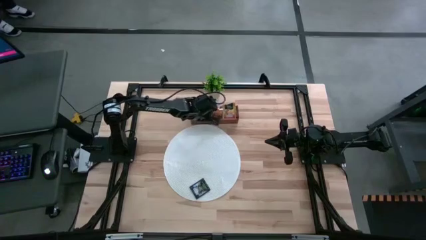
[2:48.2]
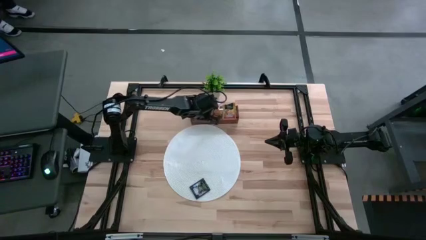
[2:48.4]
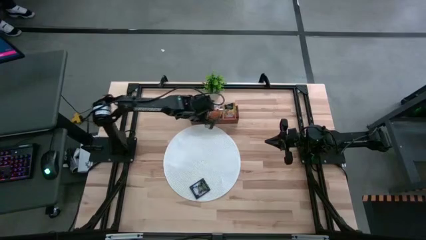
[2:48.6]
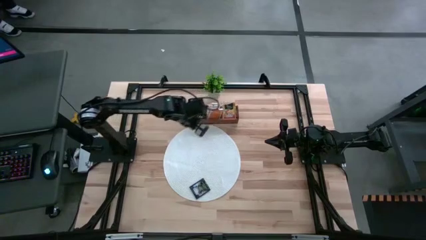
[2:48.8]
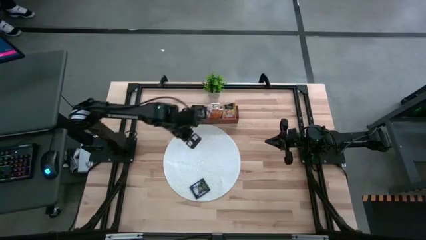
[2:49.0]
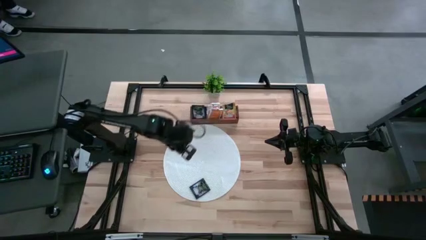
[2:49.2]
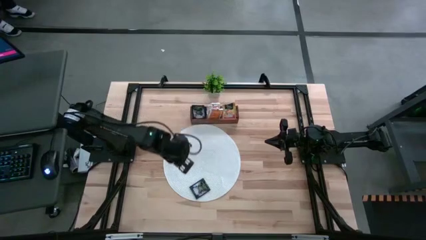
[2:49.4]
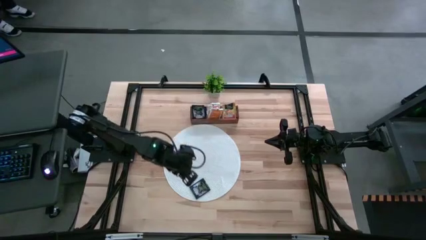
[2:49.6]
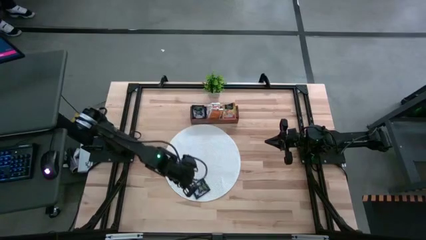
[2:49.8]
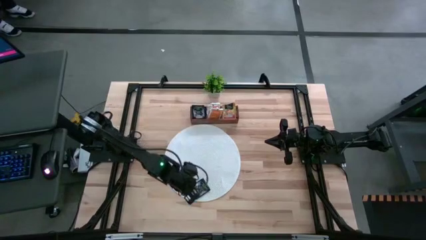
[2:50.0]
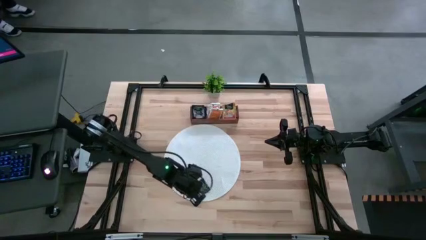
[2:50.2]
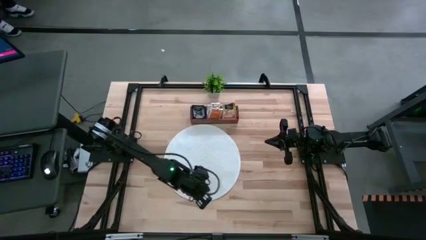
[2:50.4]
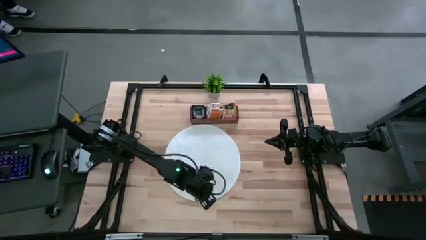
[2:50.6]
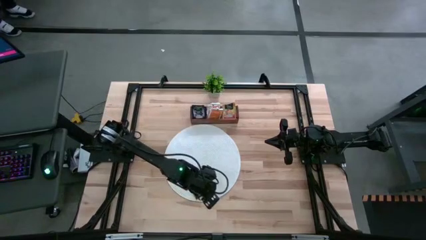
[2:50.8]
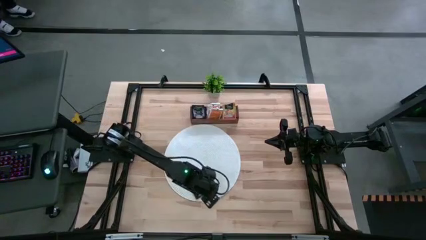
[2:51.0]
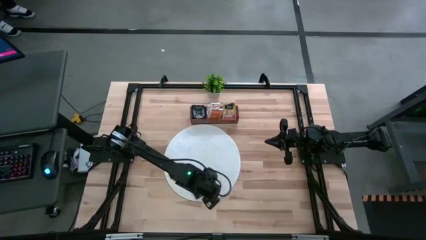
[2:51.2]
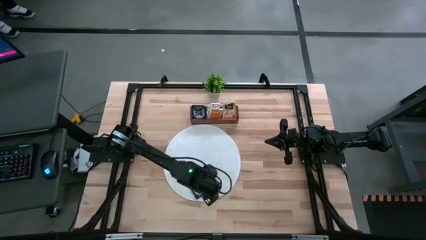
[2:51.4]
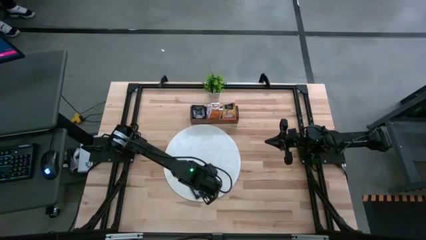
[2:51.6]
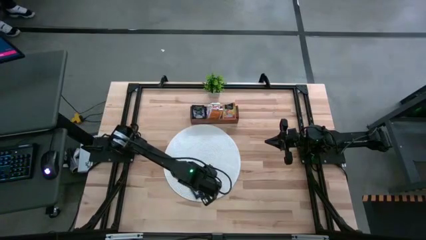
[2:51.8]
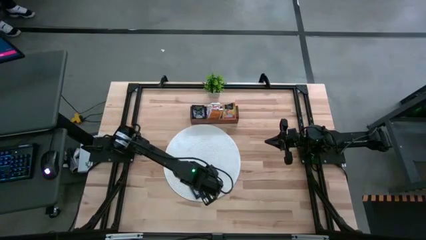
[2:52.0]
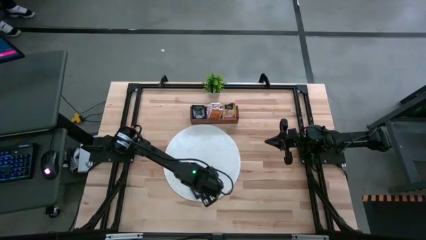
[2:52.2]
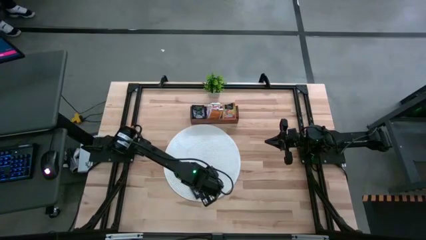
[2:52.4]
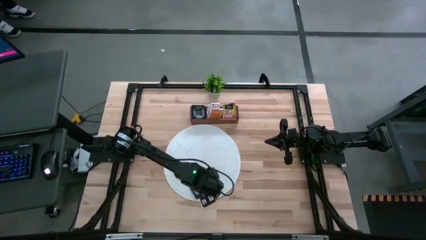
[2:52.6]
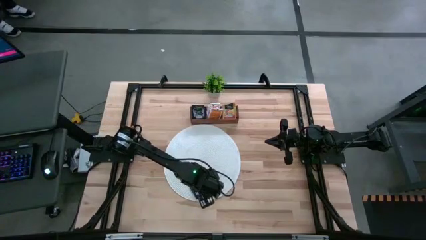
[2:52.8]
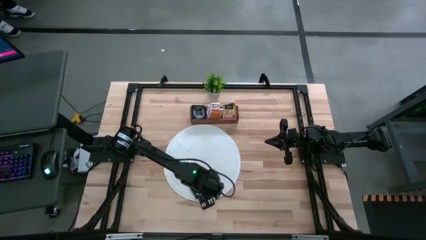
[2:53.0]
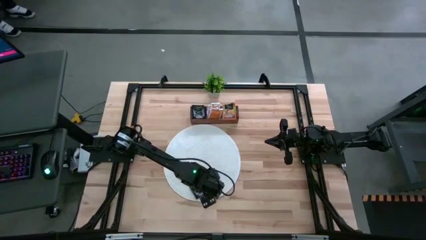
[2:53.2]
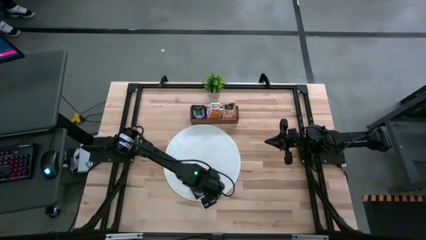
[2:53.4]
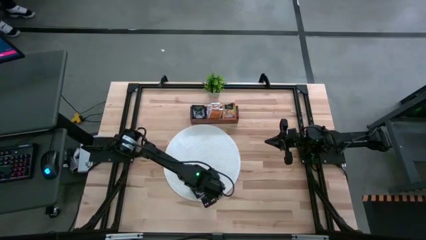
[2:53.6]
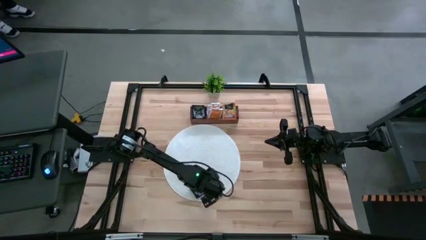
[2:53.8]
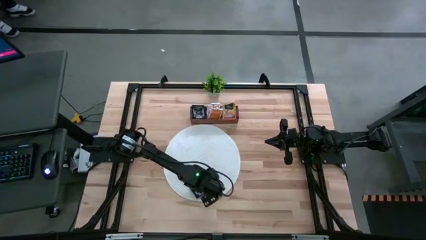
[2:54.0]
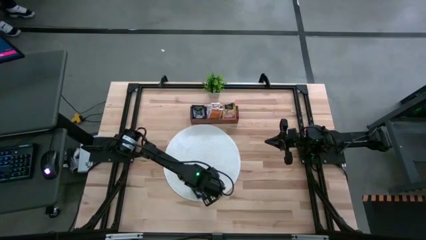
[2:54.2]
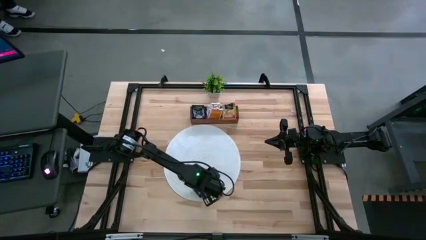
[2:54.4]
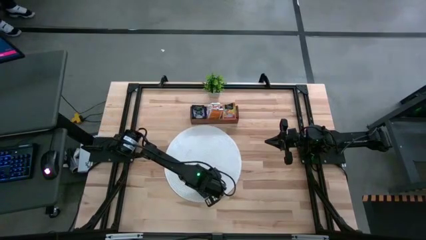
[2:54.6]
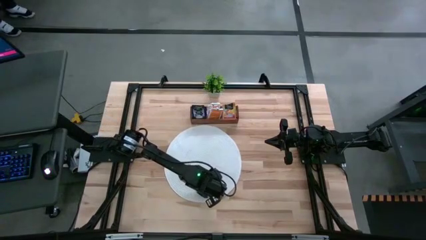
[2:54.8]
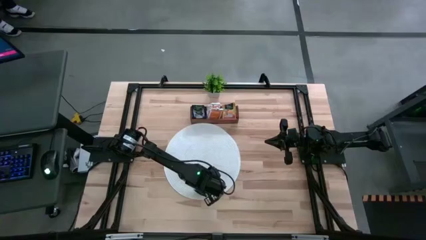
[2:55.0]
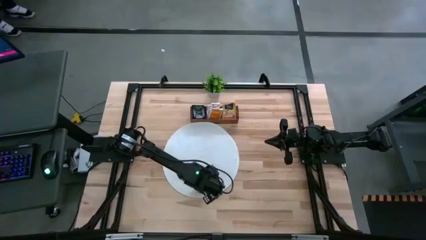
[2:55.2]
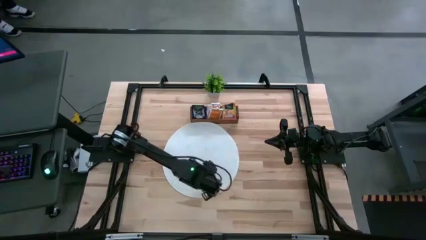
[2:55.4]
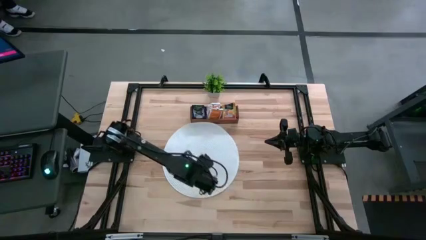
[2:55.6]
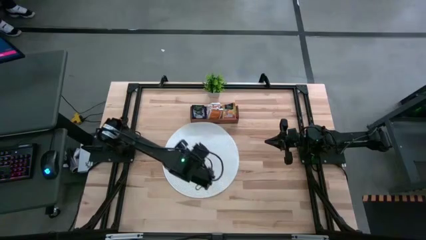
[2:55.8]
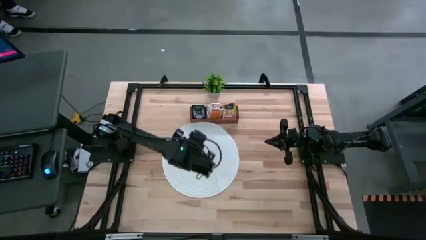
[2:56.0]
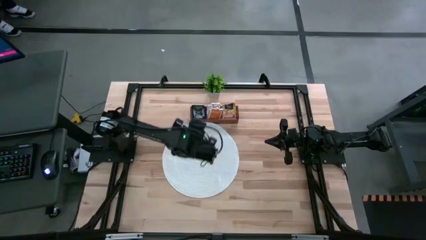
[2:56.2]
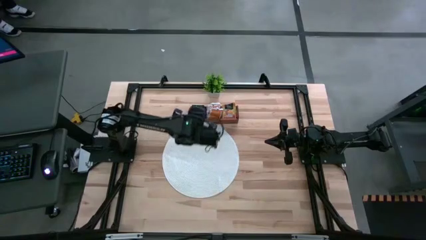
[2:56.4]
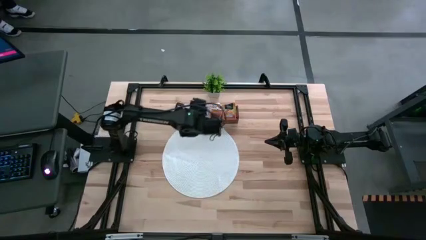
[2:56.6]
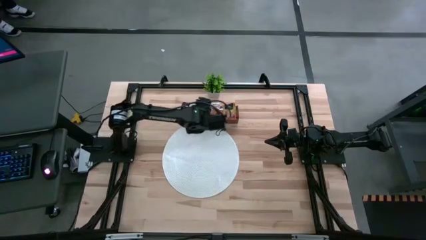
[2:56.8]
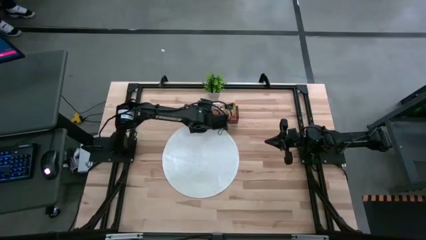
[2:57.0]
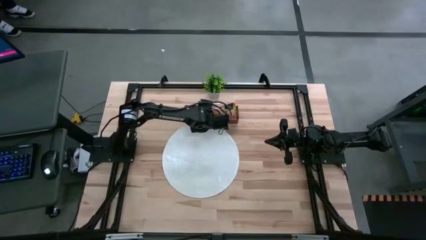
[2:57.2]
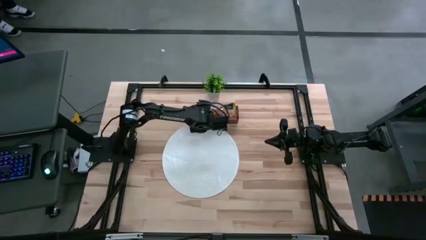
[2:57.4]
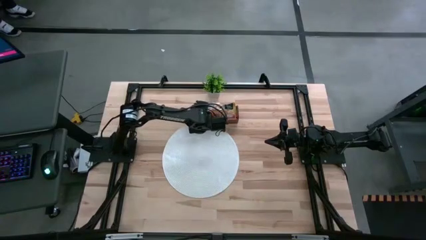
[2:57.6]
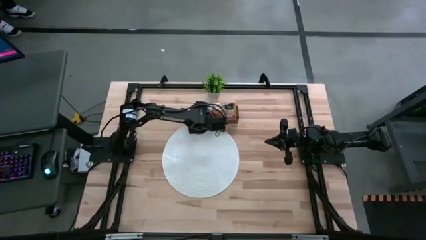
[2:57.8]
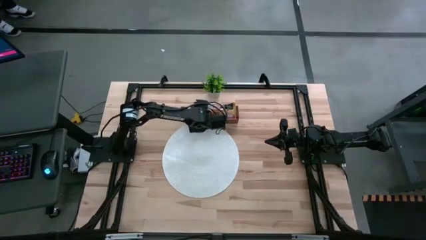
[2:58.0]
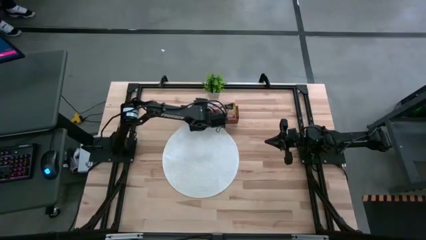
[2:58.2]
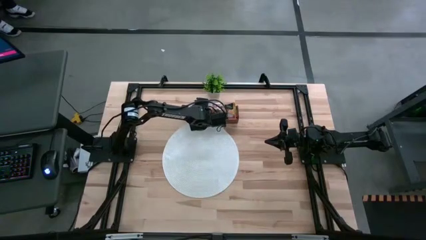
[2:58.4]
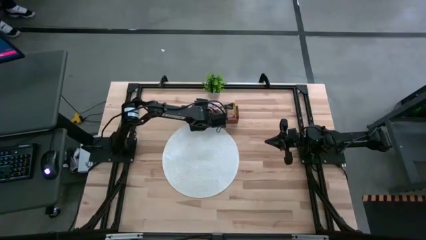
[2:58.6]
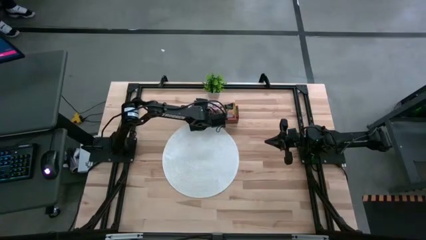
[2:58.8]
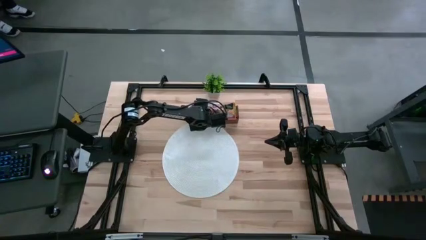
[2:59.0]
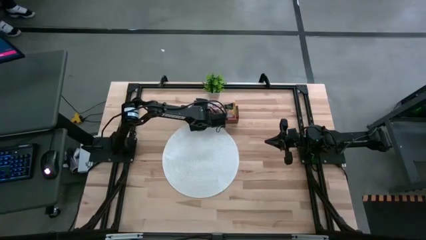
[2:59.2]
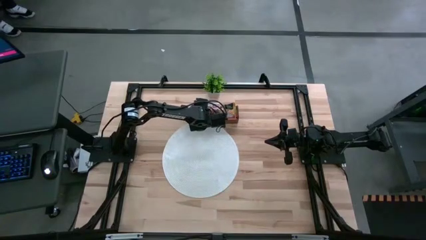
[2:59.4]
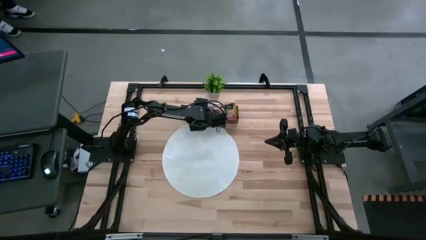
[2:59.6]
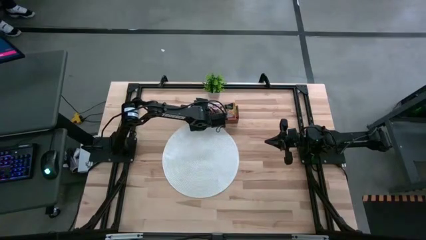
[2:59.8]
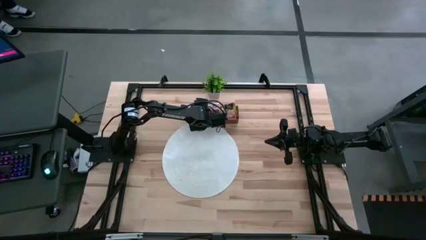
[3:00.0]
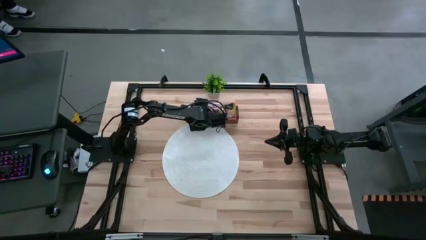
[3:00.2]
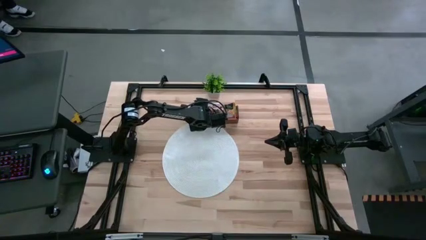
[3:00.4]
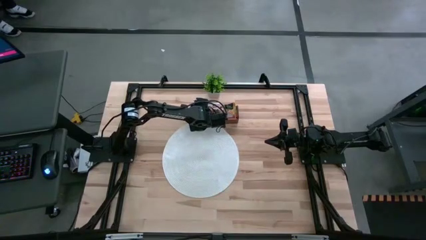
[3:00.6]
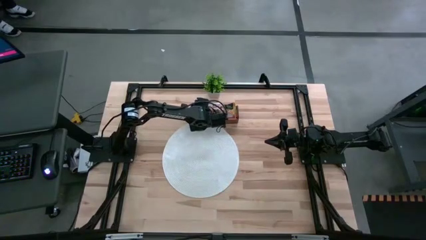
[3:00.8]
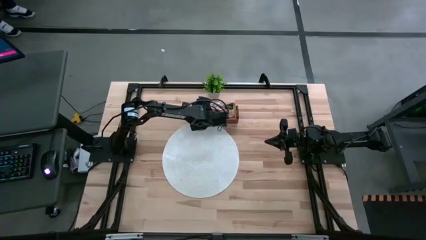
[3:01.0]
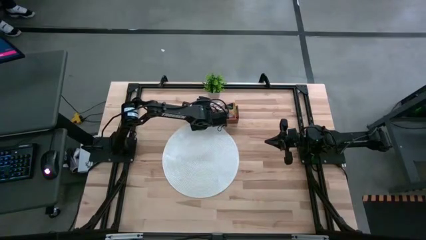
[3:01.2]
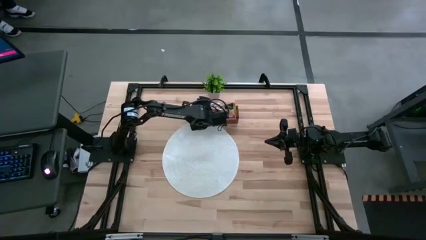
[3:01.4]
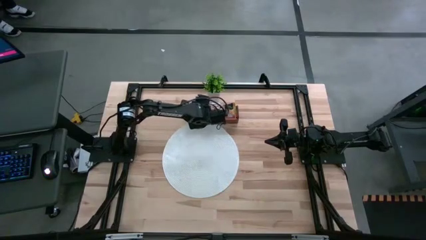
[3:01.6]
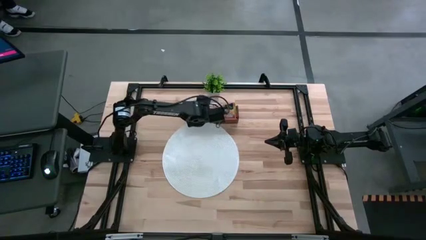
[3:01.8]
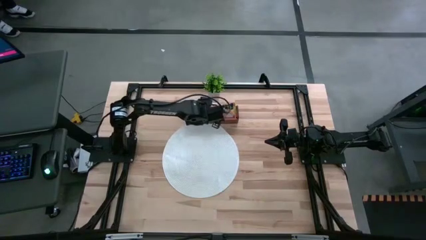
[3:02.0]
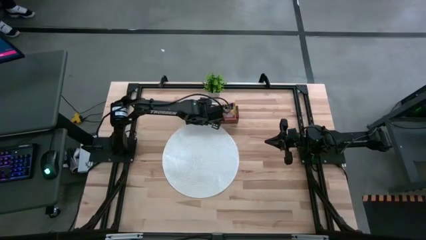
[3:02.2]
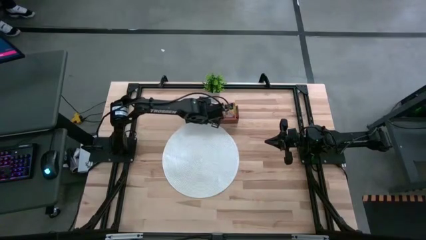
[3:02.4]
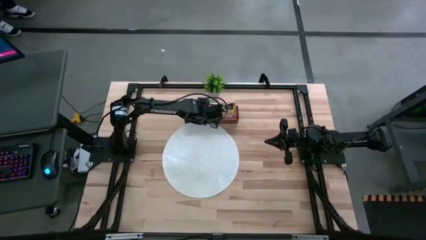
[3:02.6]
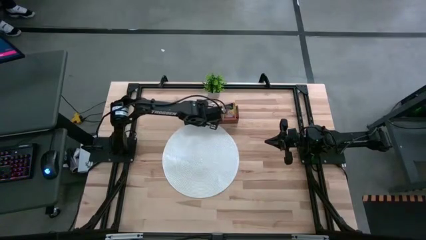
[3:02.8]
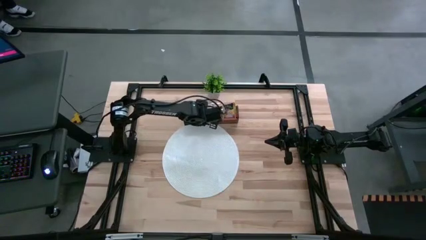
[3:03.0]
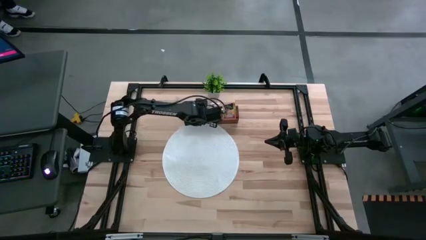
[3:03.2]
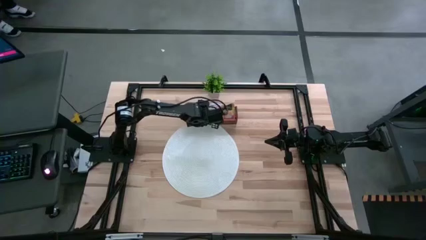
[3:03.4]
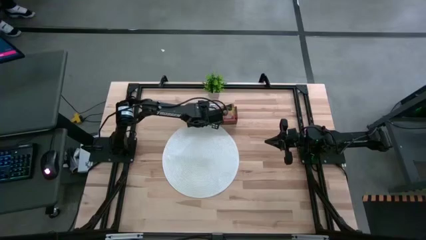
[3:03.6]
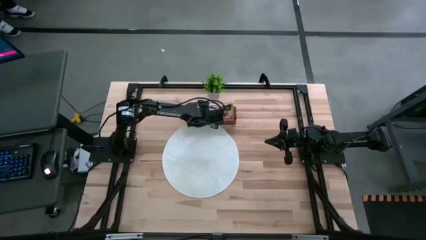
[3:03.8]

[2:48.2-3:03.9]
Task: Pick & Place Tea
Put the dark purple tea bag into the left section of the wooden organizer

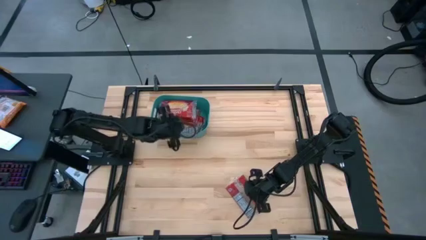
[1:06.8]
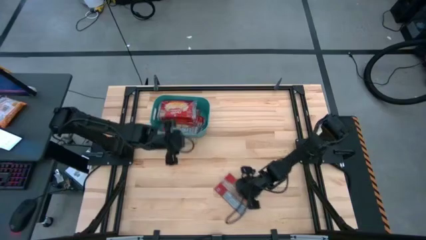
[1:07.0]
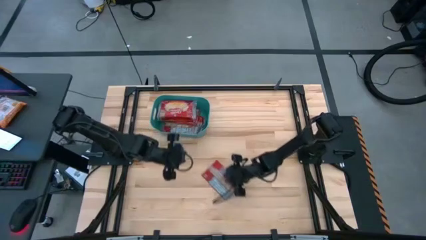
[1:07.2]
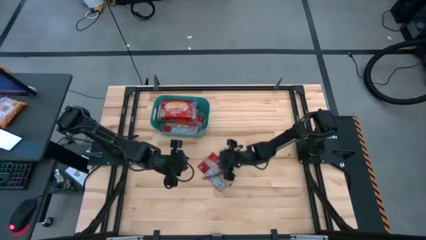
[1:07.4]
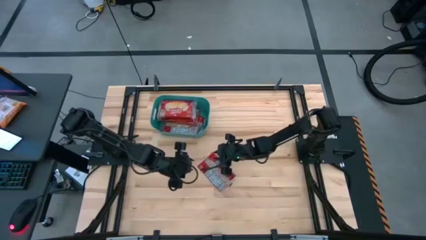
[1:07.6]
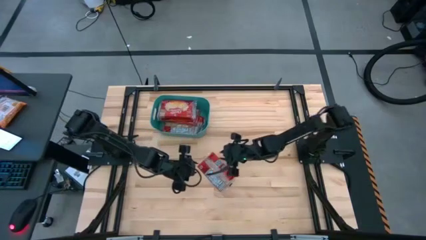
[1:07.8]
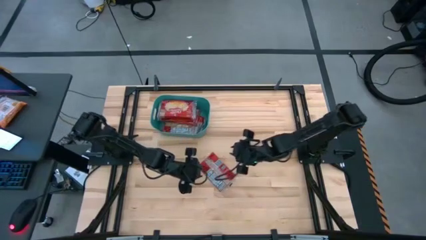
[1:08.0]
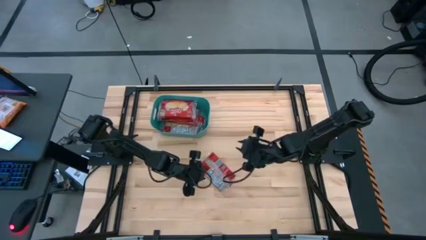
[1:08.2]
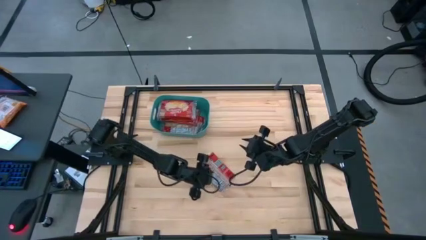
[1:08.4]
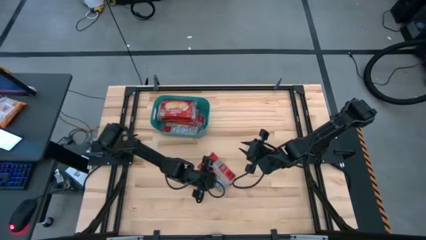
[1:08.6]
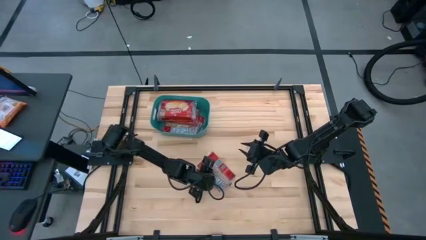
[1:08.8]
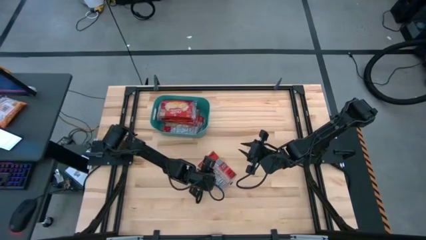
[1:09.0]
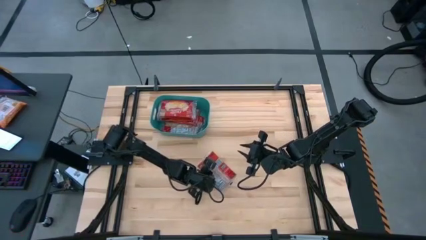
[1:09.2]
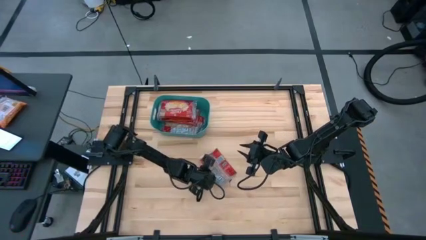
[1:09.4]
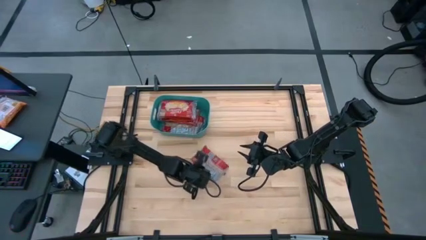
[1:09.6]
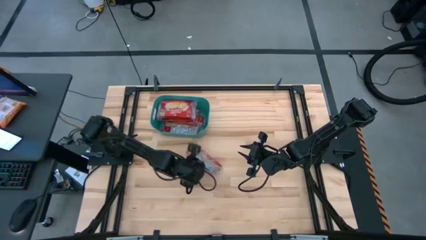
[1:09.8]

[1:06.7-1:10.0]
Task: Sort popcorn bags into baskets
Put the red popcorn pack into the green bin
